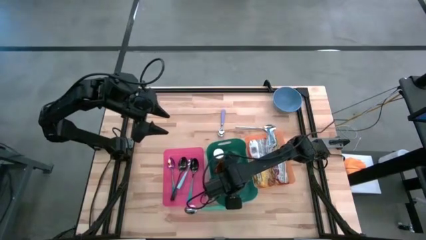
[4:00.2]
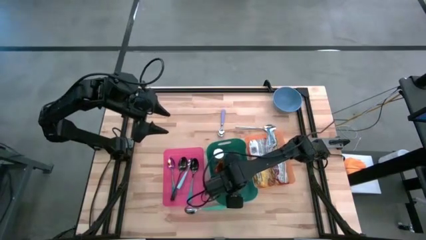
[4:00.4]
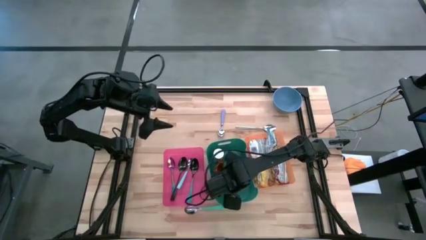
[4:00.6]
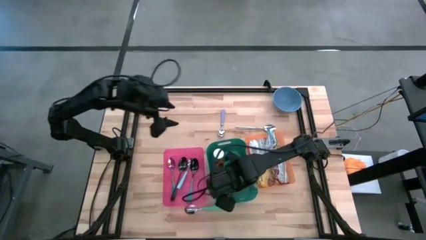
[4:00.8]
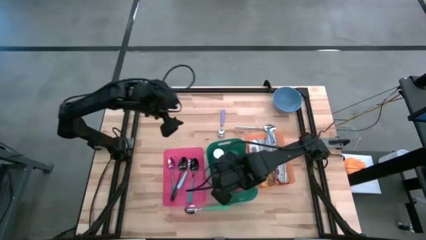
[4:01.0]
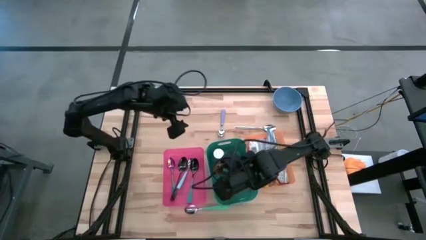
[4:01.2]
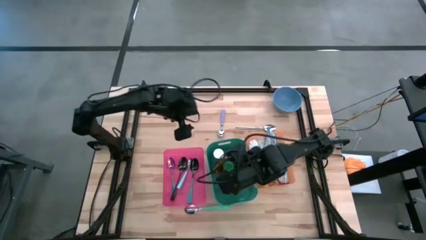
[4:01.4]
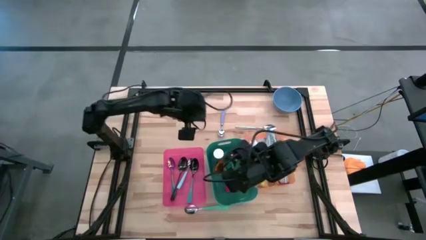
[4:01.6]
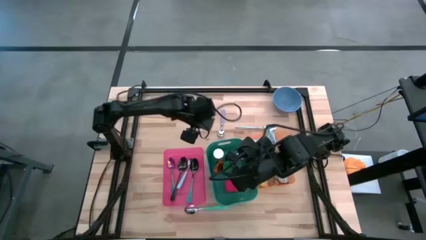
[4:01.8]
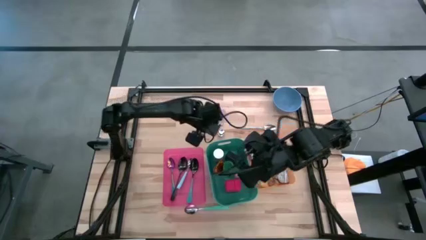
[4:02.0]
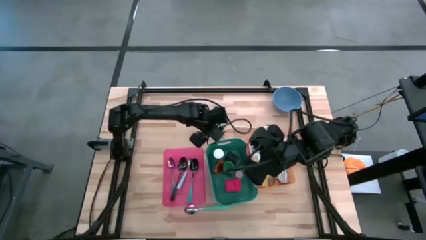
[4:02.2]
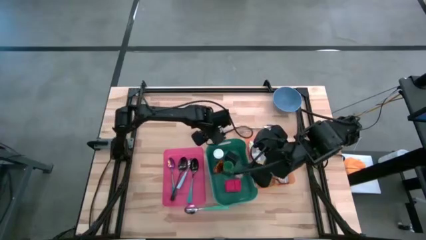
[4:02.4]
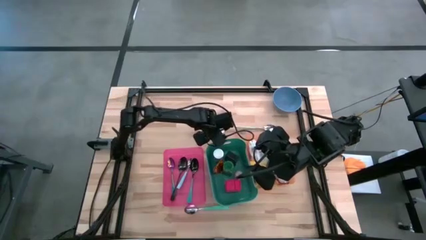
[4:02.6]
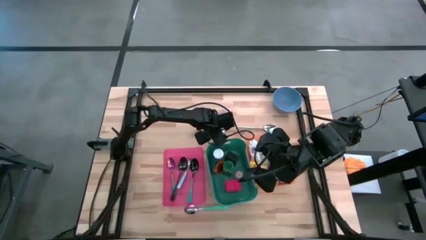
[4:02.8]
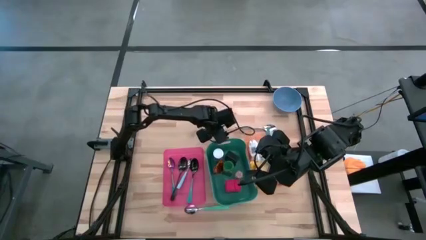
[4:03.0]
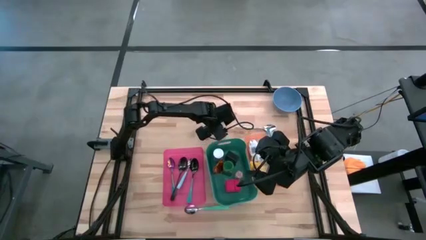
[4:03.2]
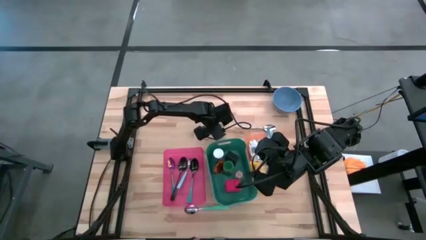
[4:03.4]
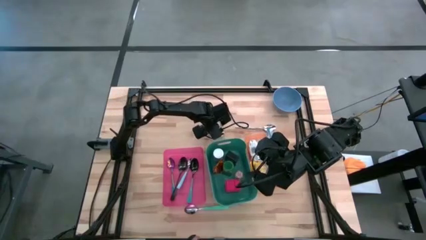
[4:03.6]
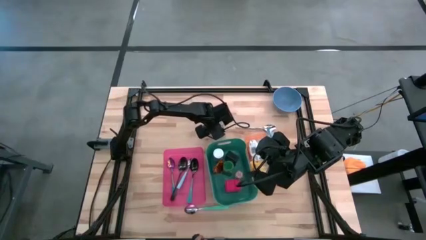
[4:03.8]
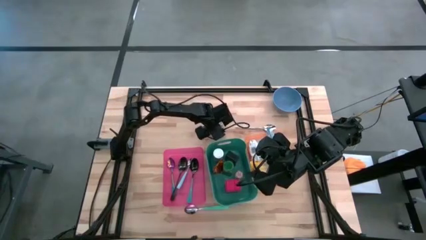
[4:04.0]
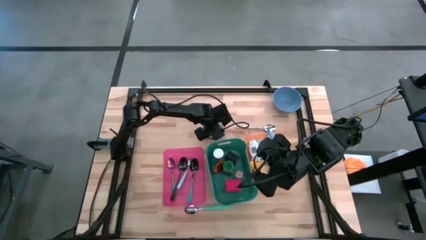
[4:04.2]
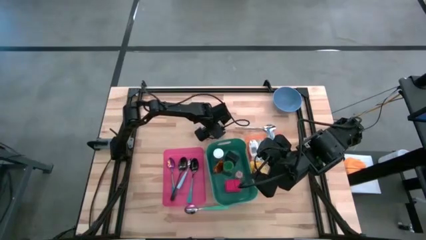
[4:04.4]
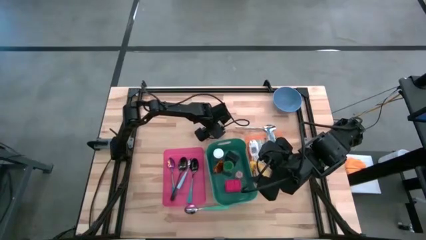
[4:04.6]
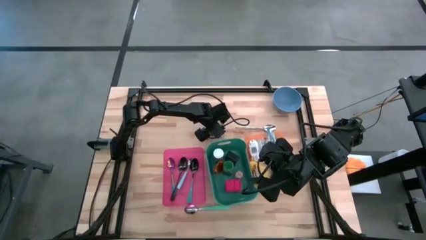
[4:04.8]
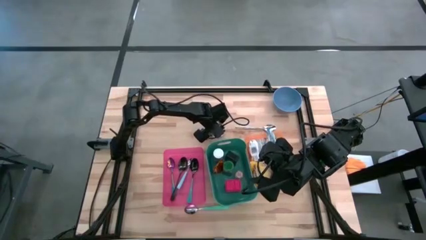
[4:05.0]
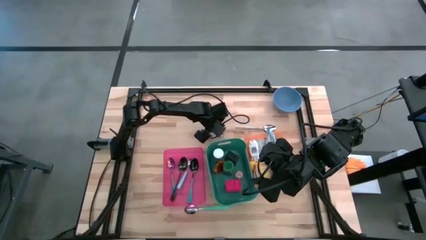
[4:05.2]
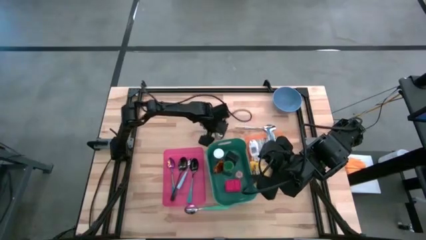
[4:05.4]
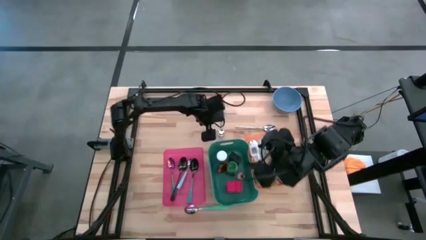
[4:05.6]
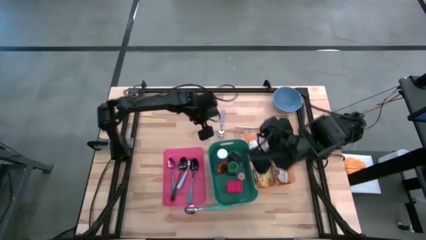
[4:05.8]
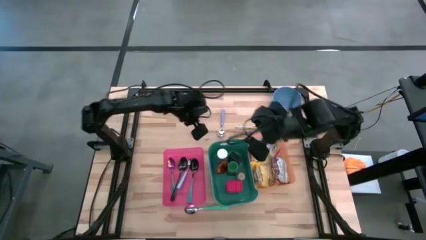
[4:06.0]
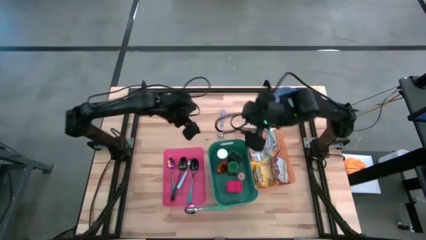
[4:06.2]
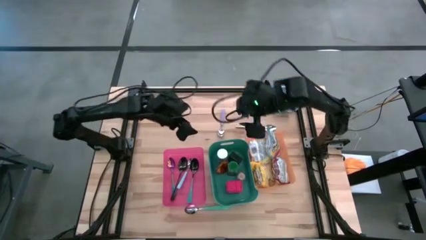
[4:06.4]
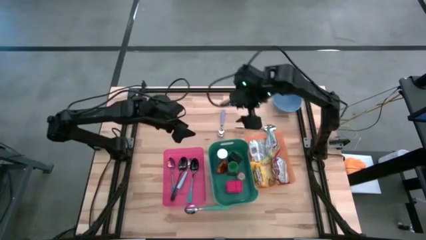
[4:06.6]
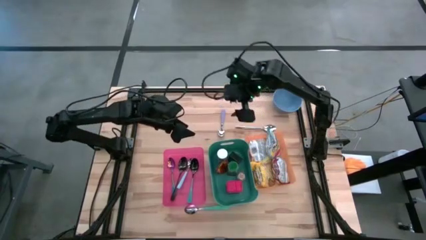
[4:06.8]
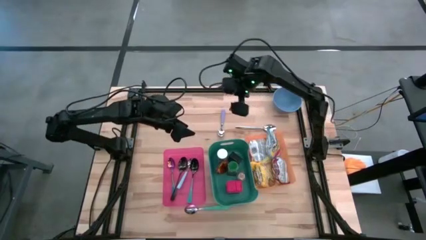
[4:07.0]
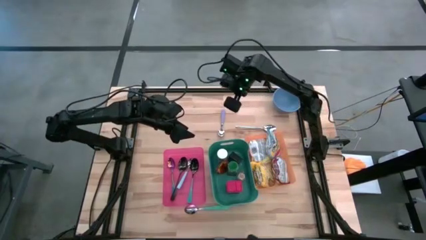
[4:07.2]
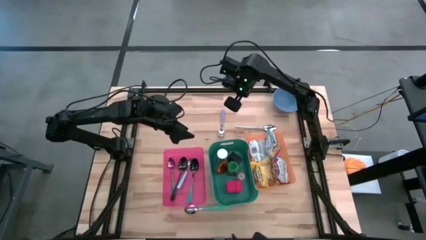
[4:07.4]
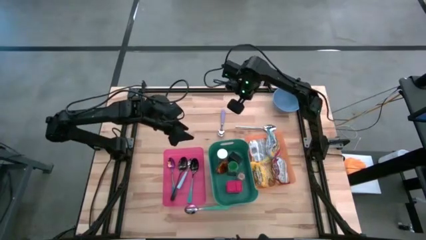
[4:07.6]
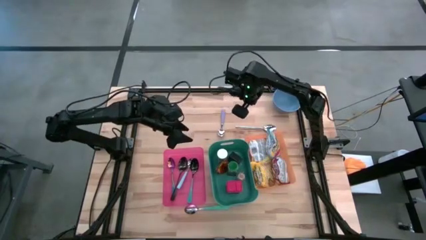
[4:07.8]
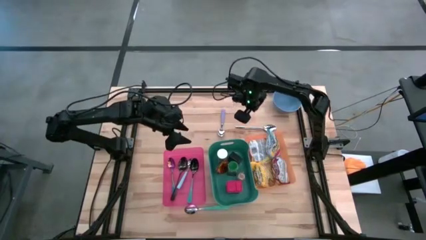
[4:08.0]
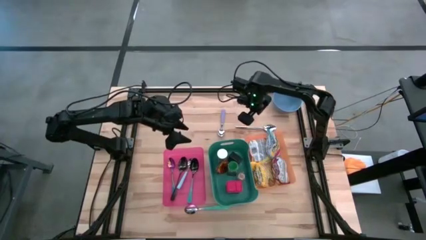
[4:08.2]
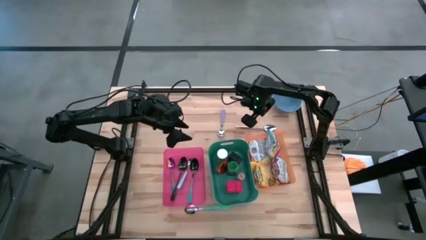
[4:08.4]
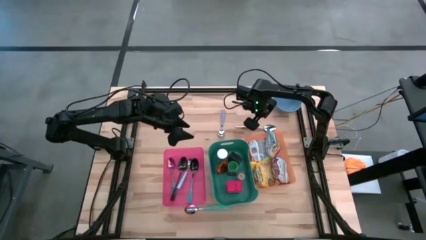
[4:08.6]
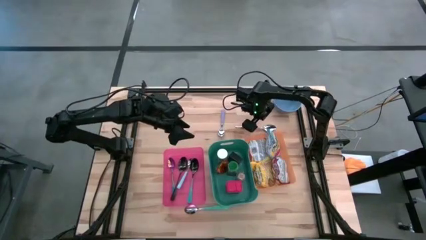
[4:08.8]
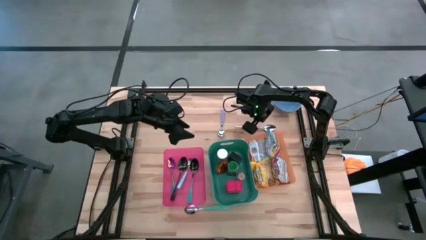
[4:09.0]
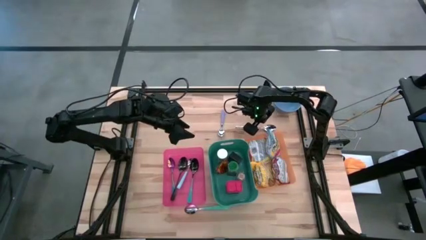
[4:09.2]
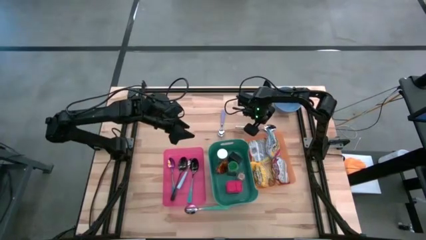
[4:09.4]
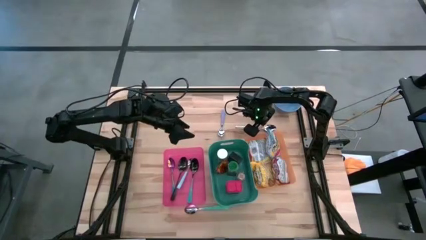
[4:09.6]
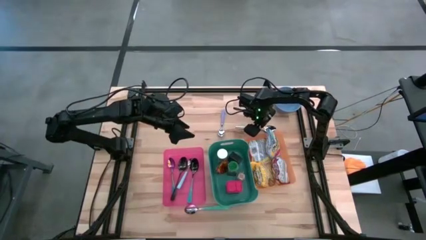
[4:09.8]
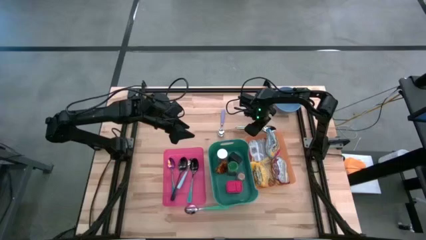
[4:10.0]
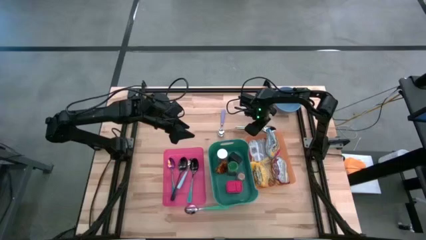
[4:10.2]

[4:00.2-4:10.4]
Put the silver spoon into the pink bin
